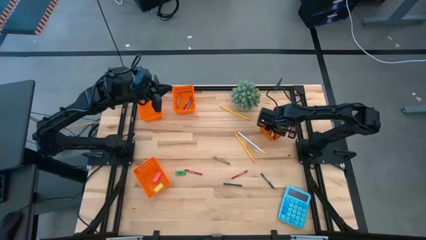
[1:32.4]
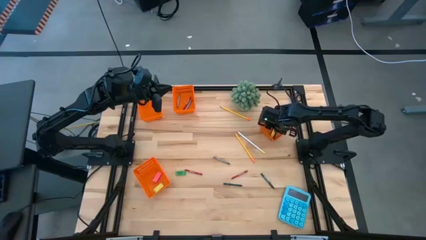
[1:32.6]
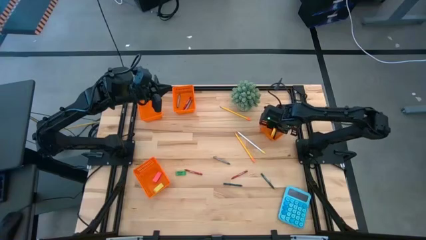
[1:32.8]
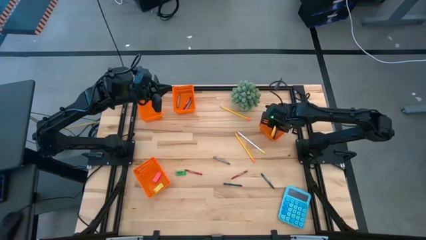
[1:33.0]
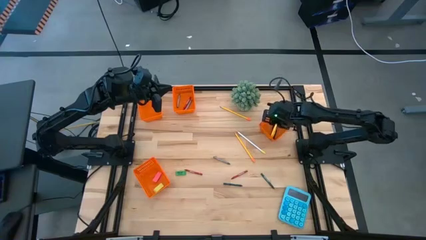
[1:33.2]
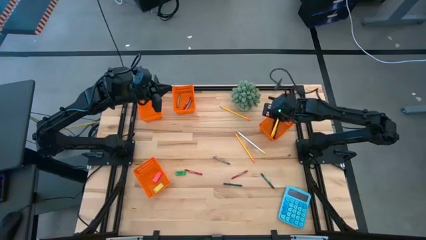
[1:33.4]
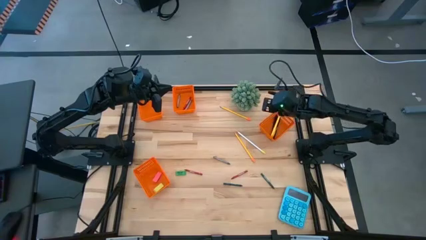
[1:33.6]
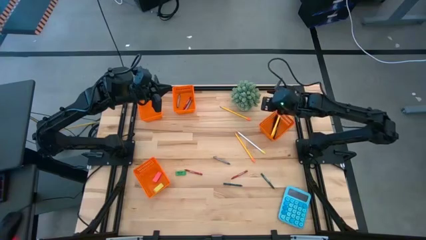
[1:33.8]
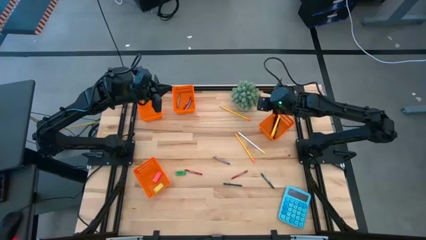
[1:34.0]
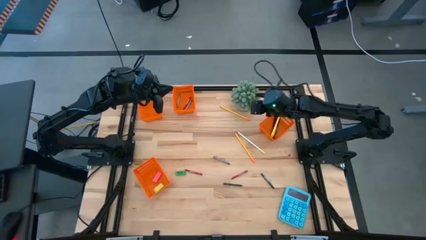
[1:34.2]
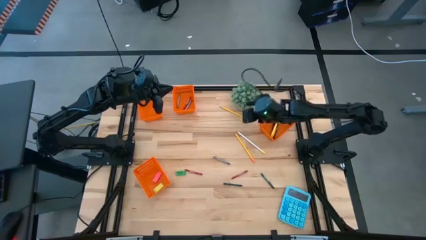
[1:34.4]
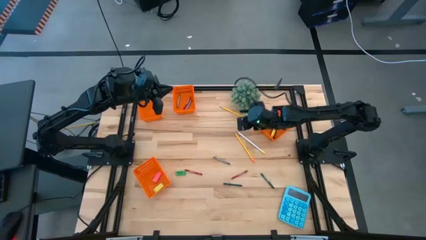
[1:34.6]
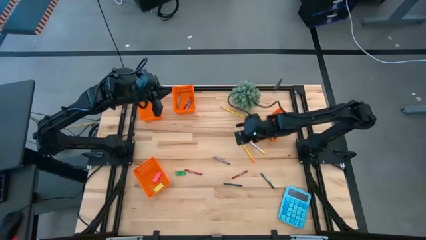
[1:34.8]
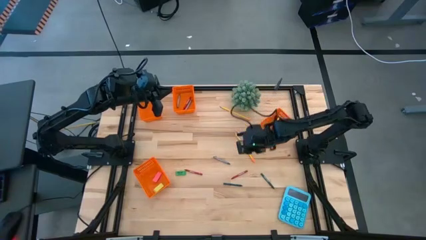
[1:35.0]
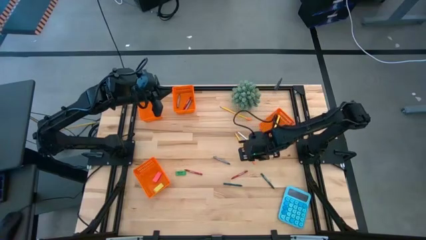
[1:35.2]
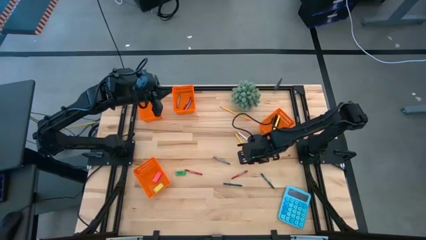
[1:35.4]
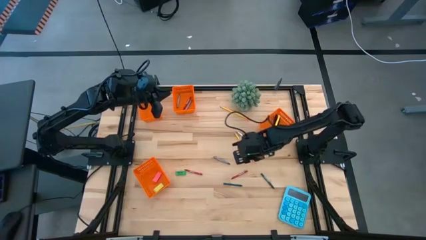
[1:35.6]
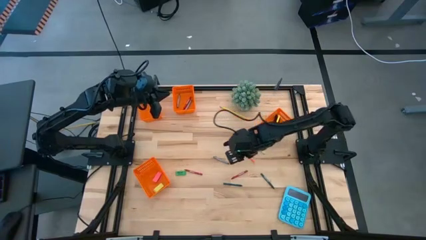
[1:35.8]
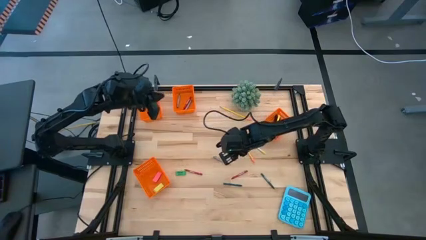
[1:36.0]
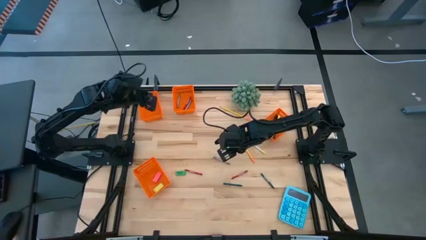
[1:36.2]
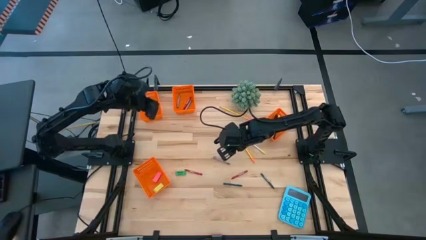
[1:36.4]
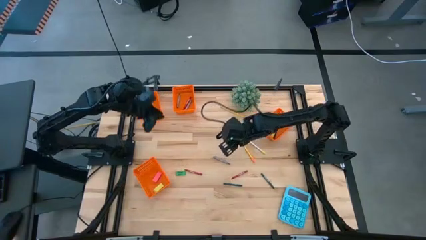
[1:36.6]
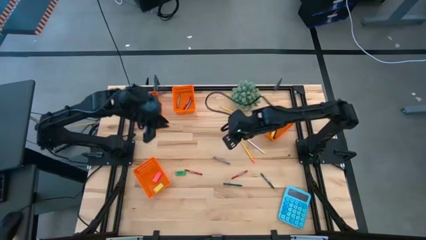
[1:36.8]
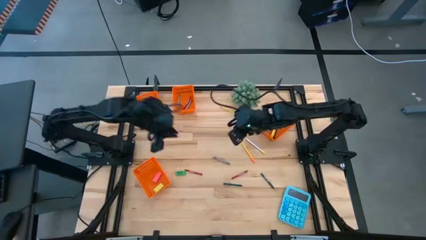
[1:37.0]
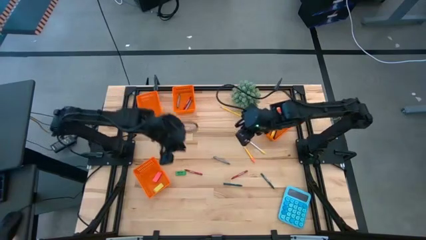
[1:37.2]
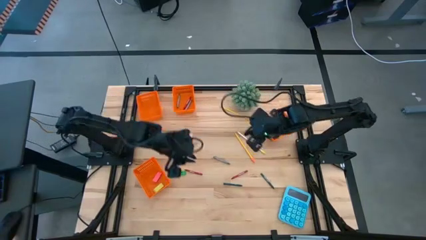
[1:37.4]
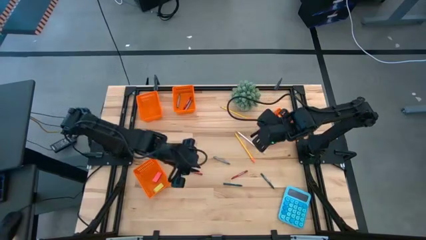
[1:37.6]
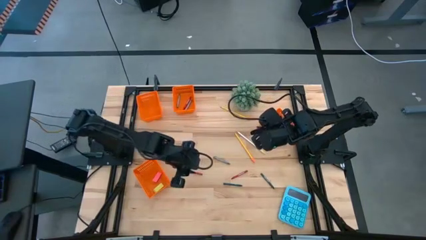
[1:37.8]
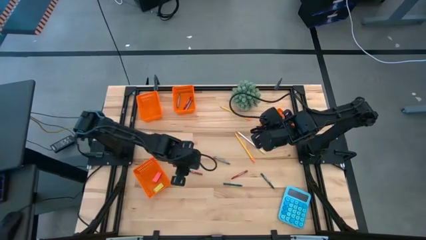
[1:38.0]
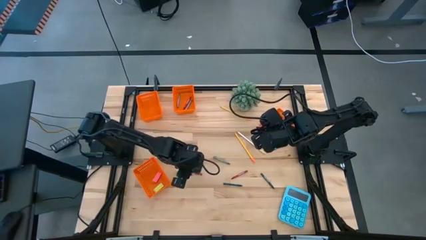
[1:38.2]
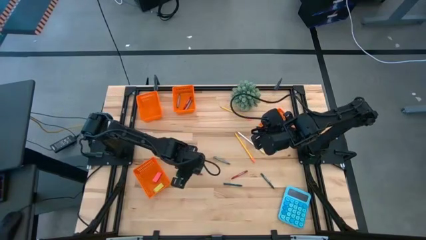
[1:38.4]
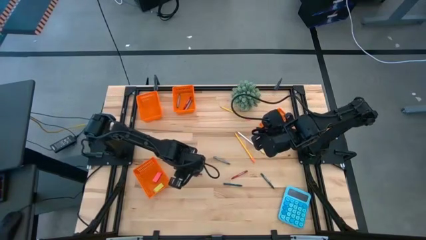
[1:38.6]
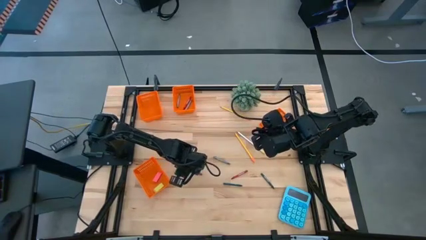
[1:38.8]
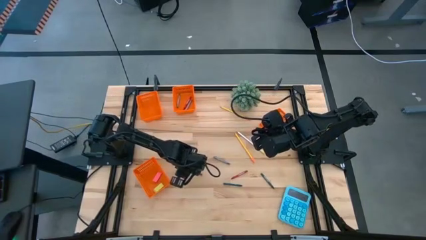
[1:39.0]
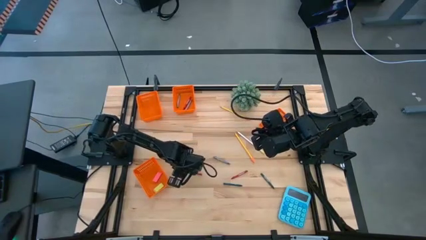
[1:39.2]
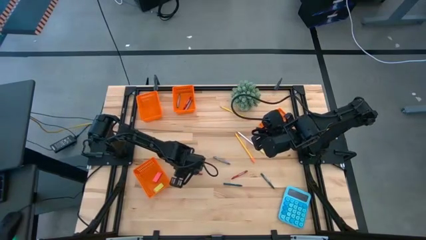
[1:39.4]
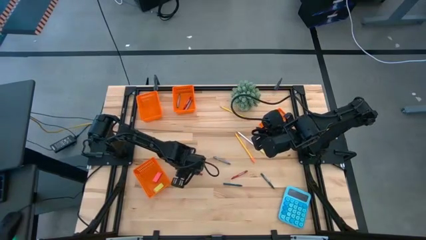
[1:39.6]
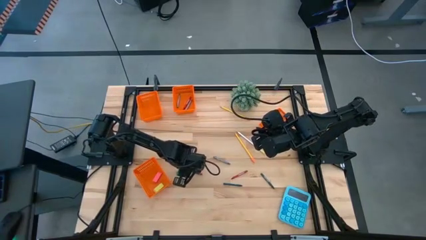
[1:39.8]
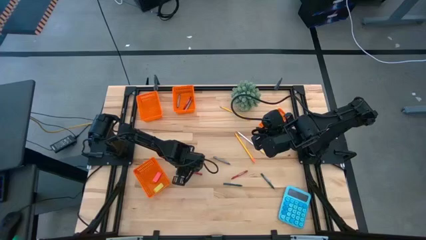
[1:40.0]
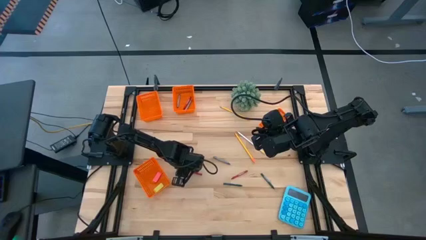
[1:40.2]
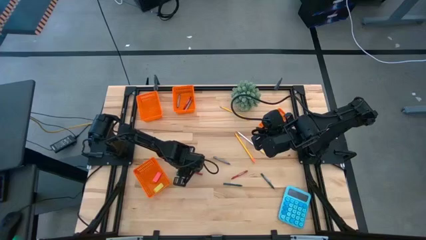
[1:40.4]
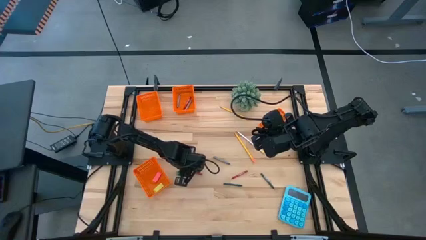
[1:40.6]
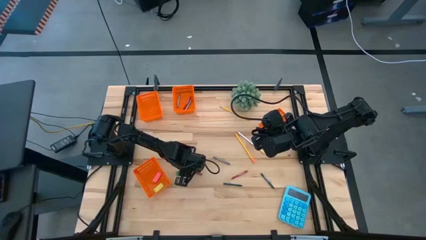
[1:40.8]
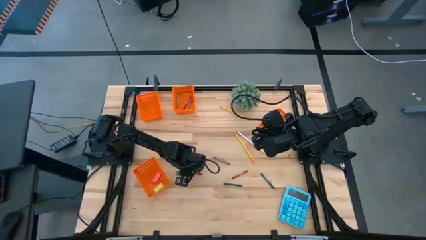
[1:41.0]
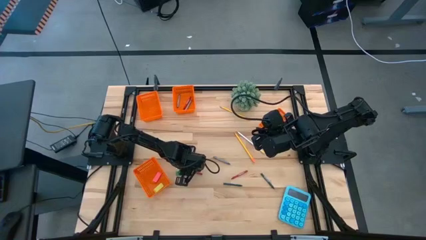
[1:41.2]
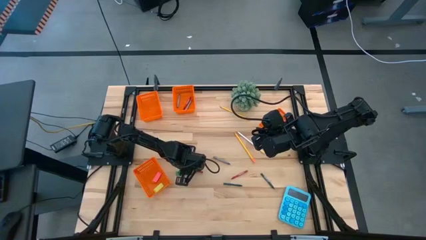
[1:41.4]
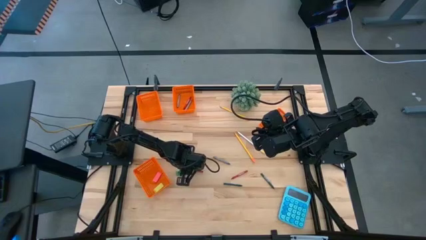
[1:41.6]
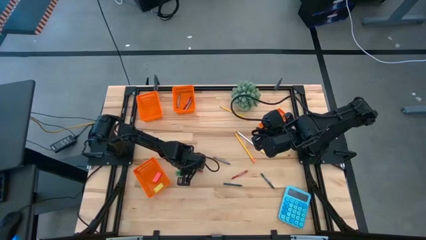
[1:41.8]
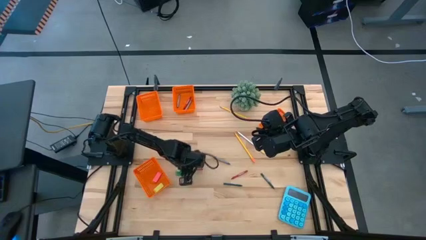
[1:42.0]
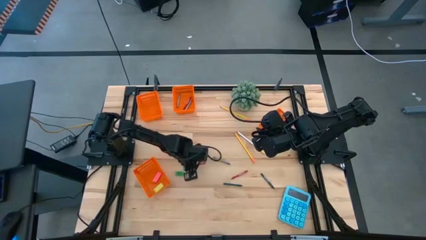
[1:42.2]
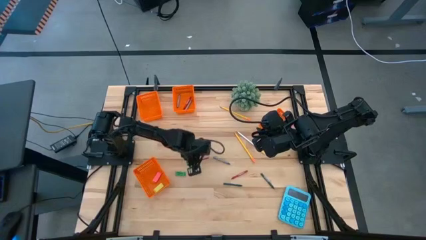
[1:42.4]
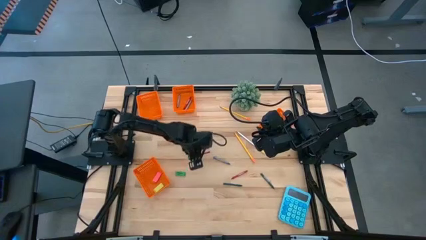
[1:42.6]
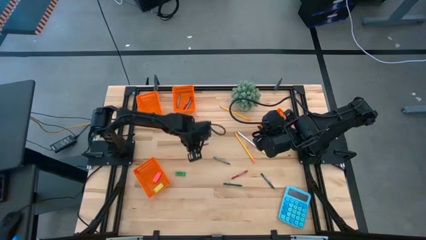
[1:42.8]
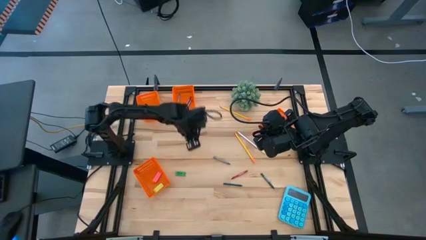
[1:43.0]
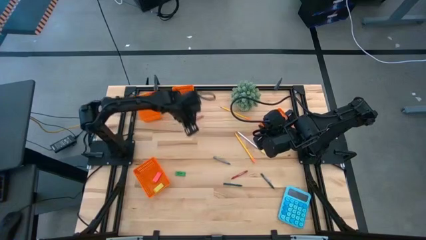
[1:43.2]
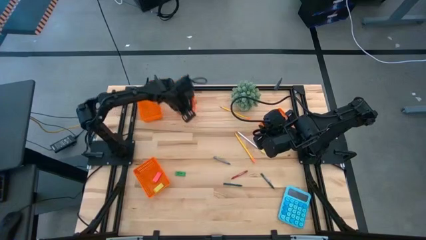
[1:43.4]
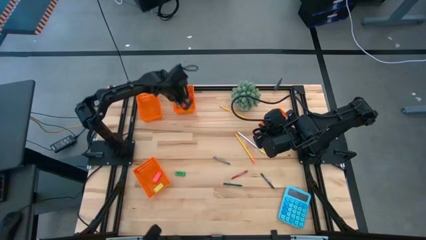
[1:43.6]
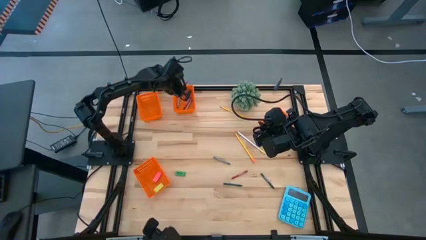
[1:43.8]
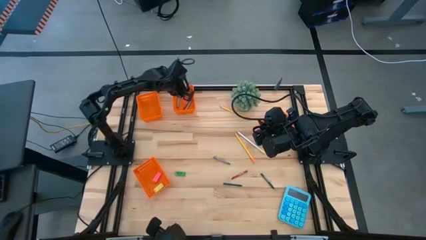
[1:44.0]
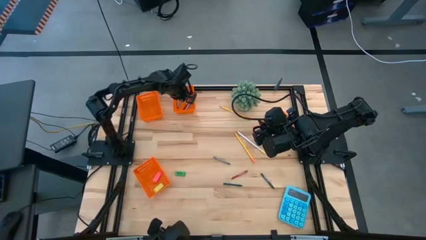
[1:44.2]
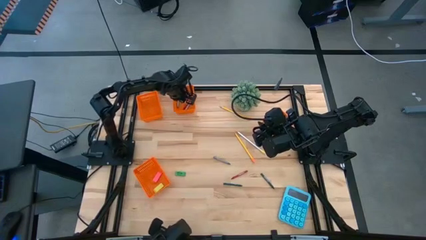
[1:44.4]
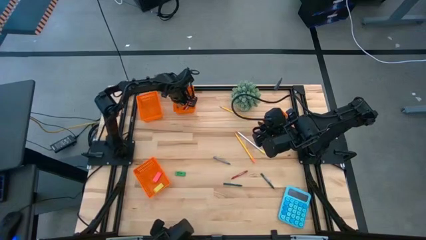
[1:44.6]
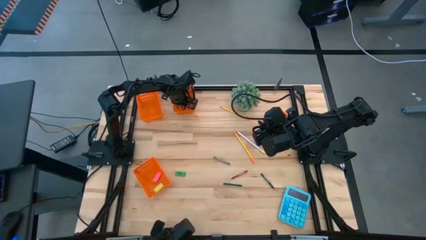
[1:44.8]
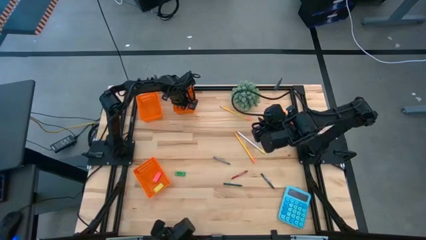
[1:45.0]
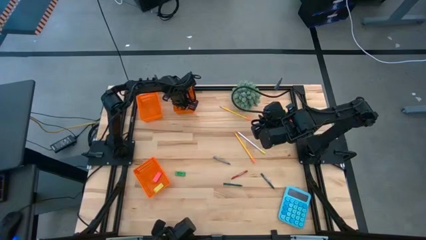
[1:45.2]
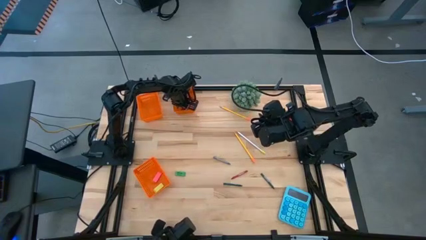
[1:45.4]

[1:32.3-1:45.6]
Task: Sort crayons/erasers/pens/pencils in bins
Put the left red crayon into the middle orange bin
